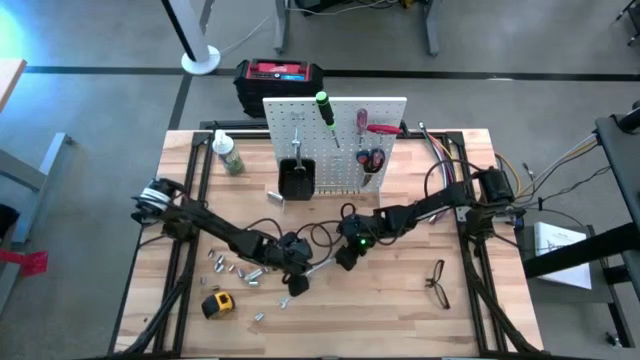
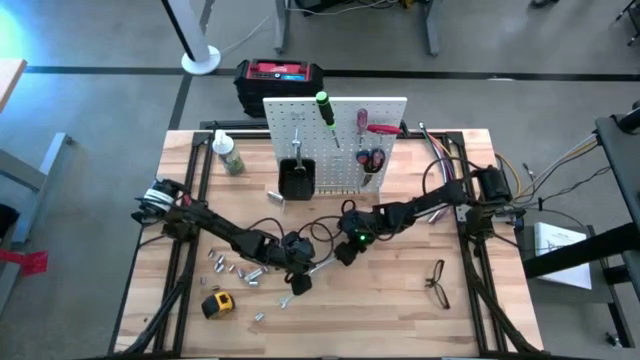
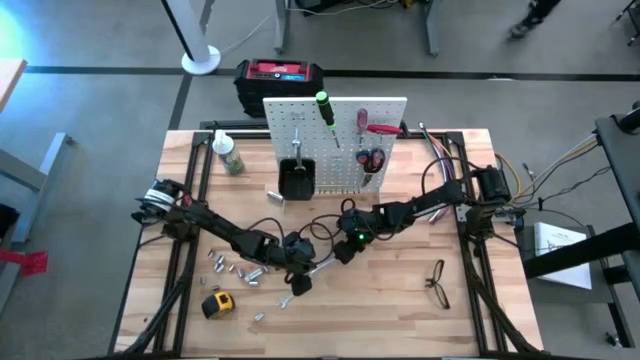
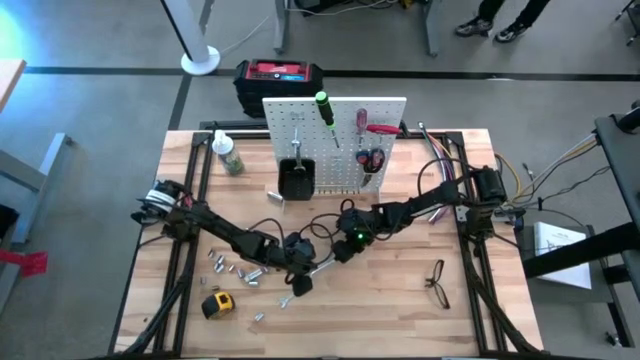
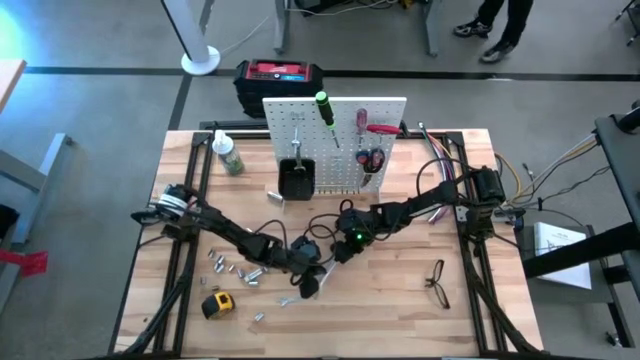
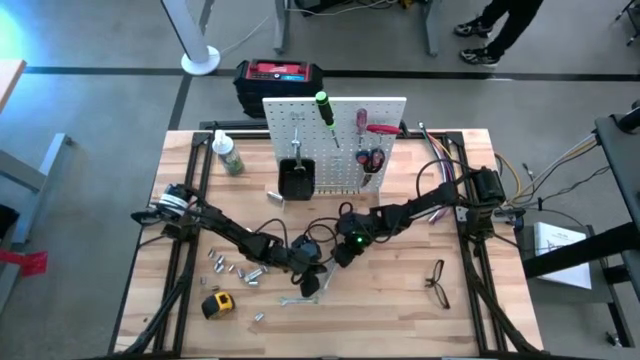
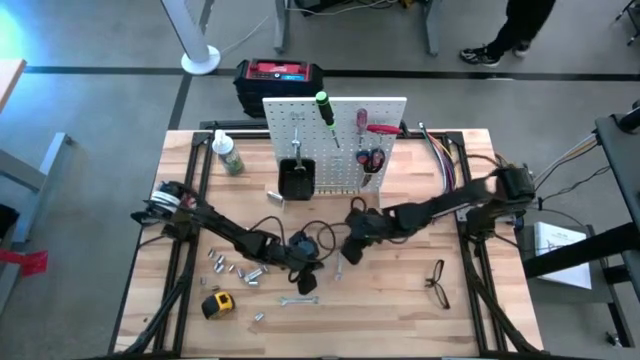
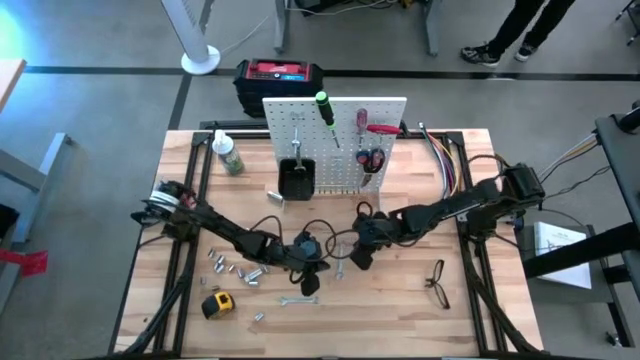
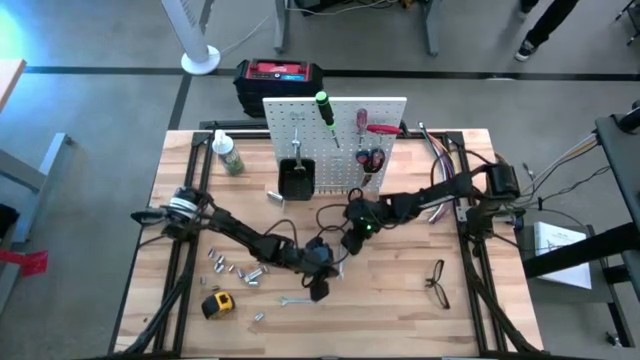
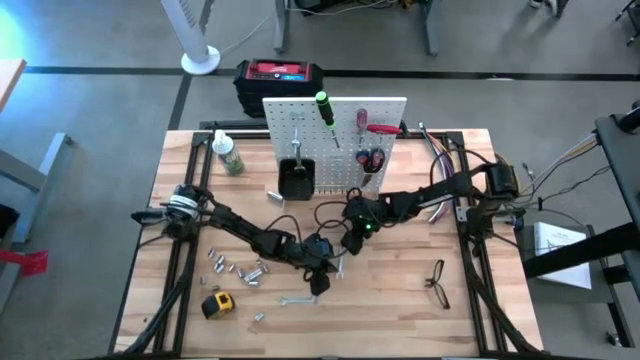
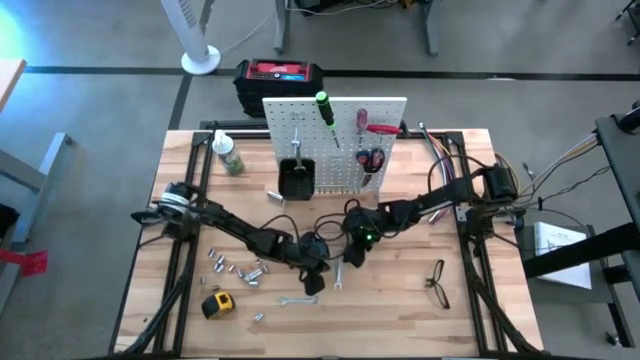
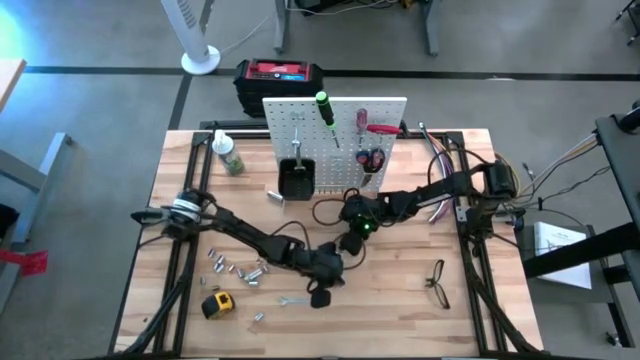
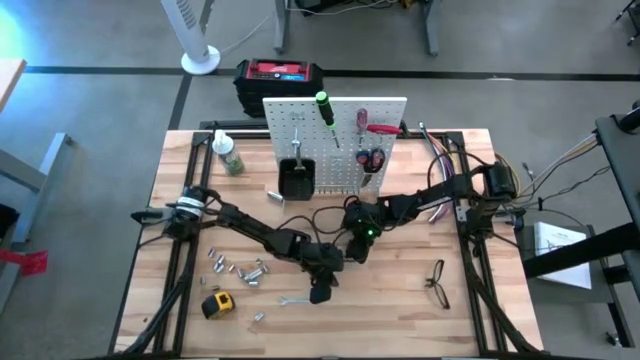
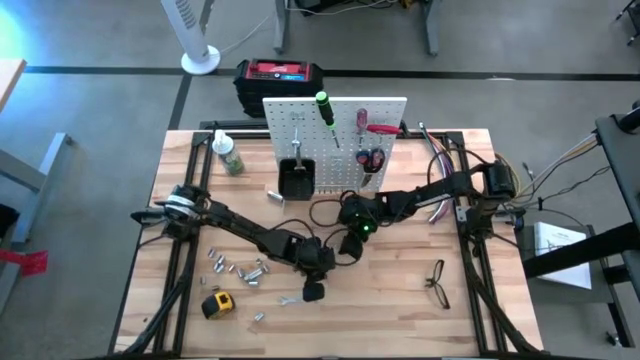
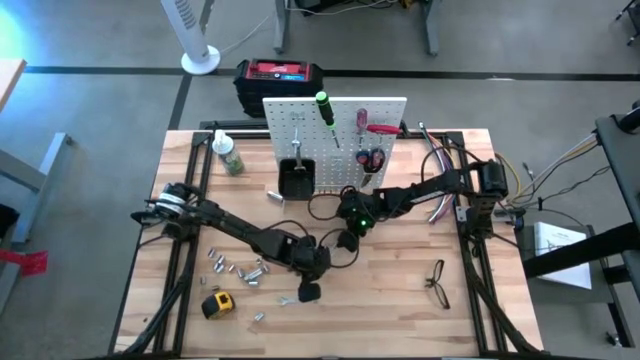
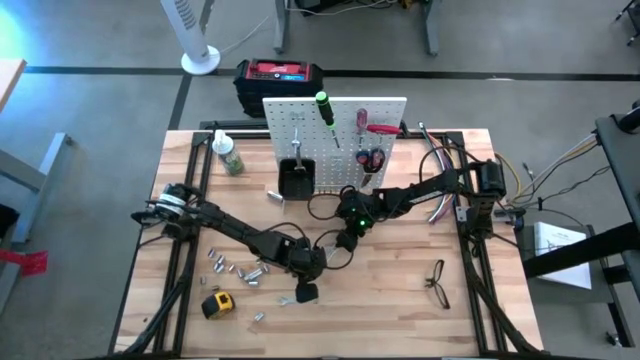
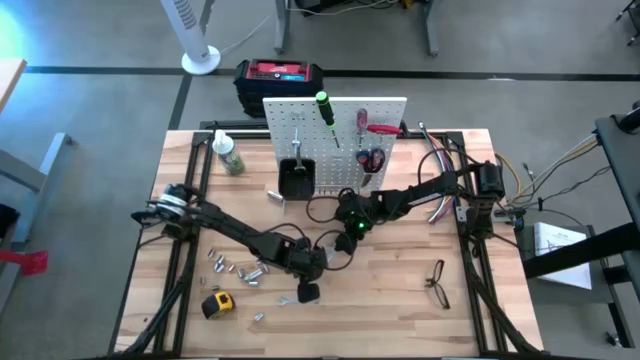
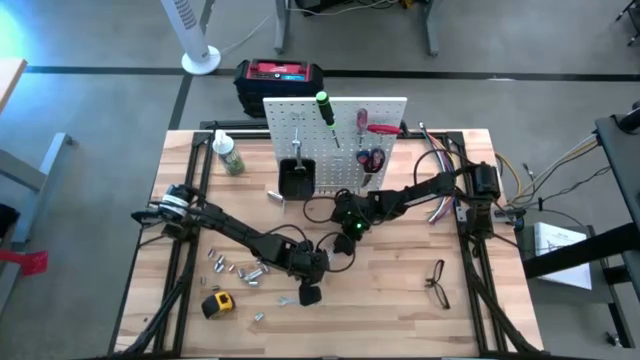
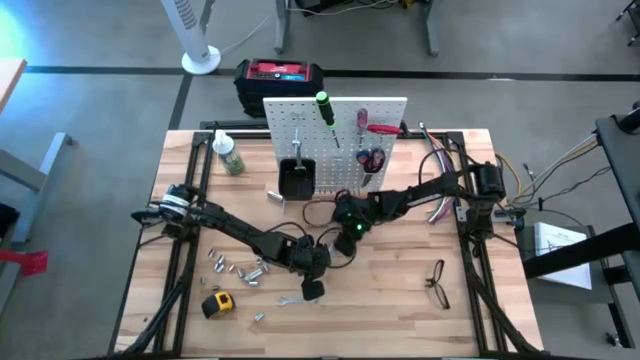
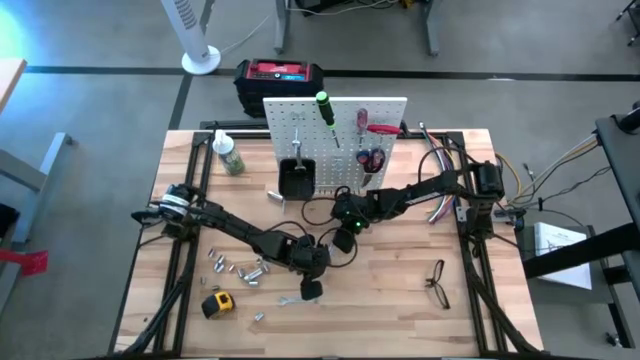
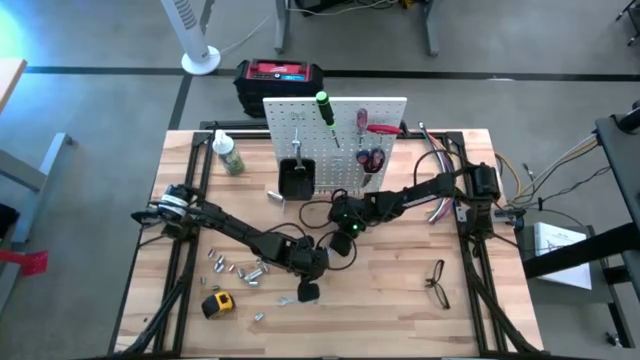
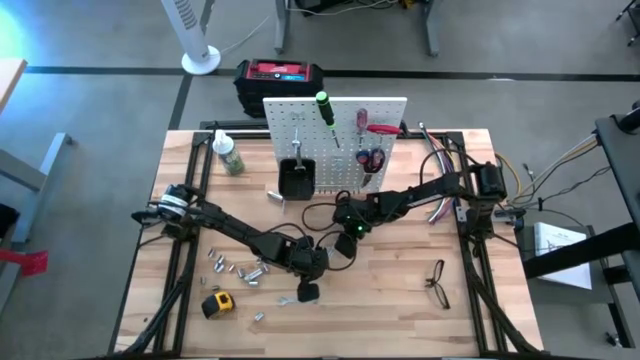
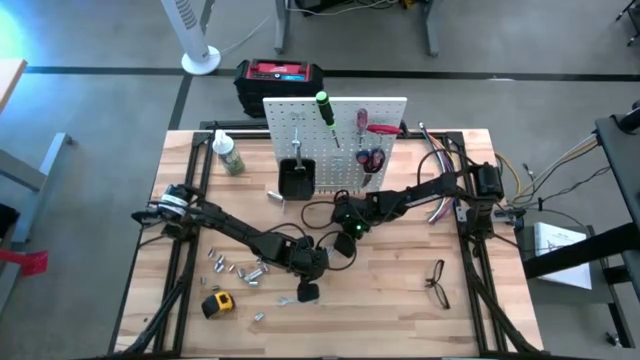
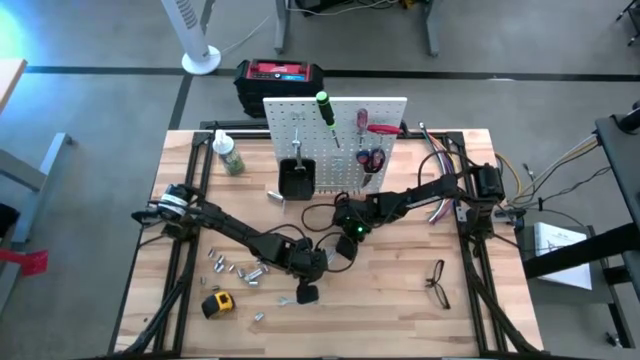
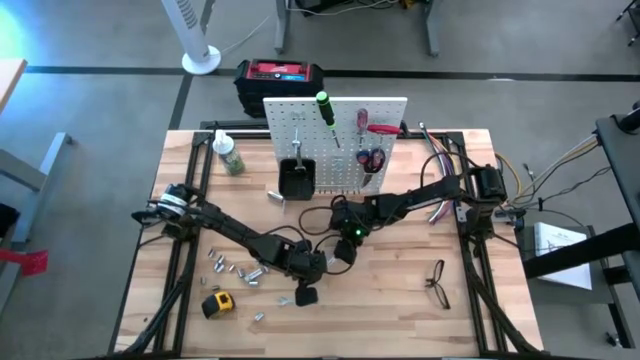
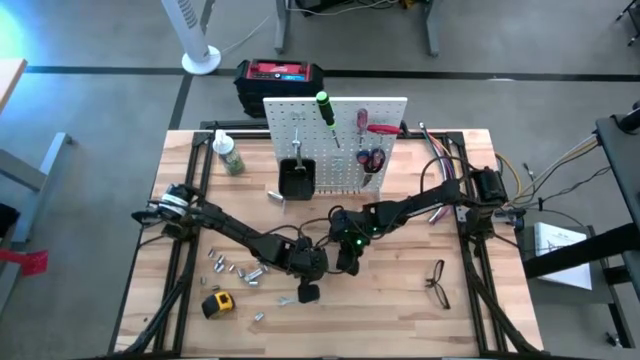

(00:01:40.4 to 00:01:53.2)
Task: Hang tools onto peg board
Hang the left silver wrench on the pegboard

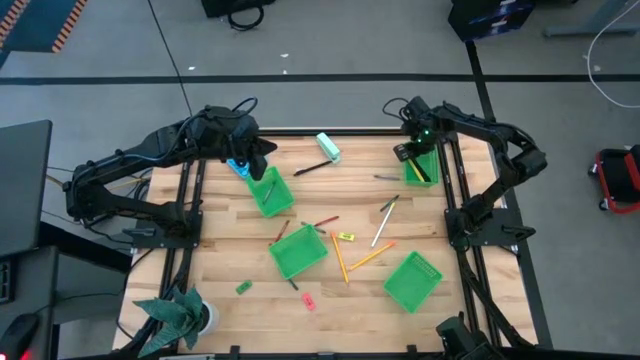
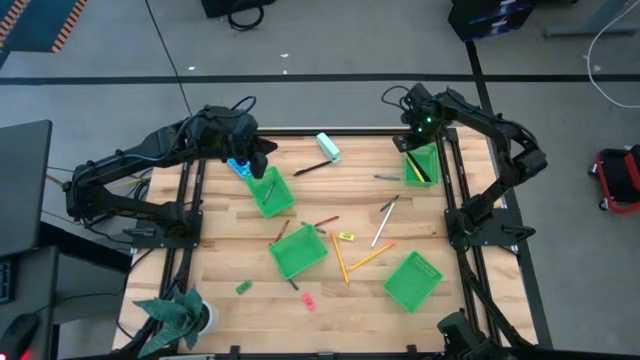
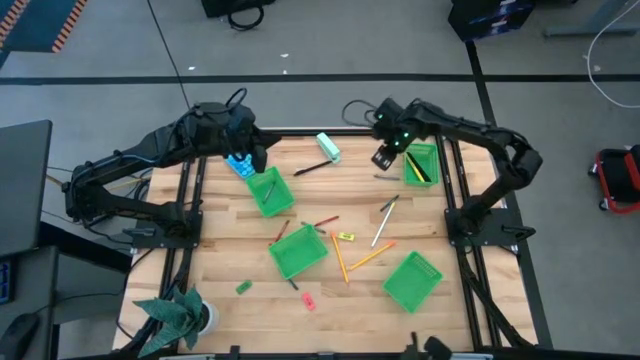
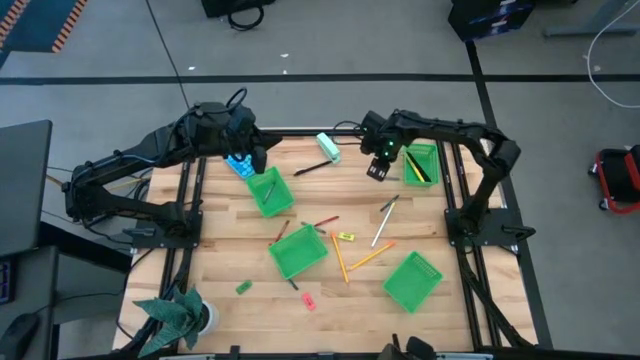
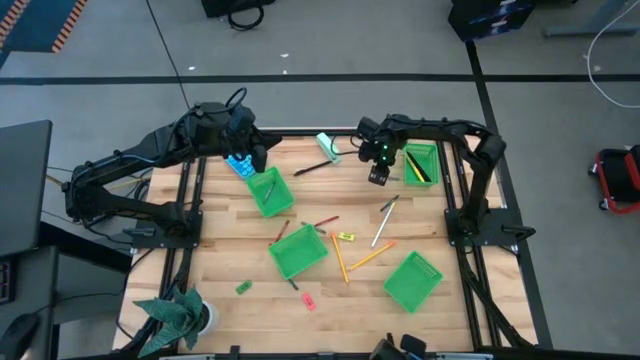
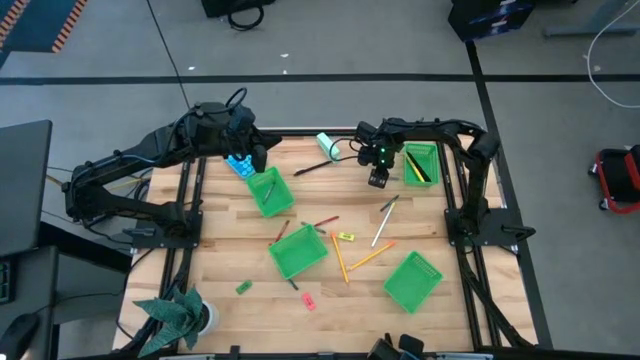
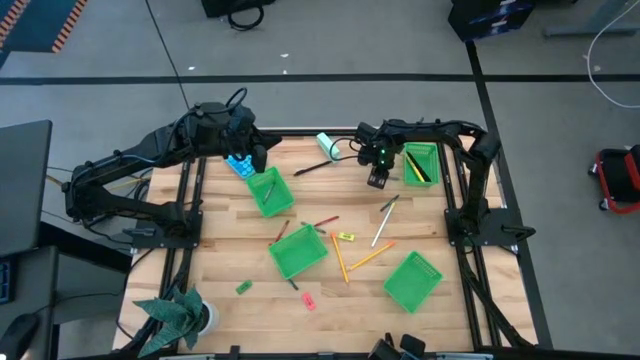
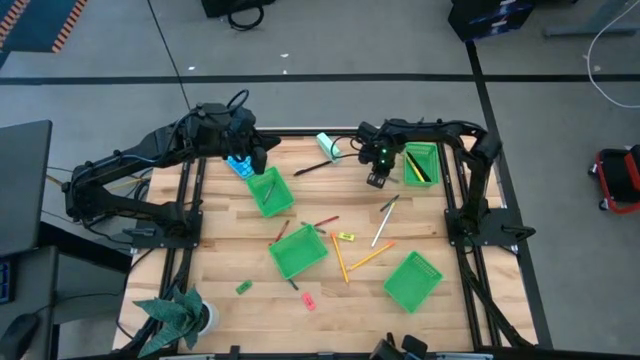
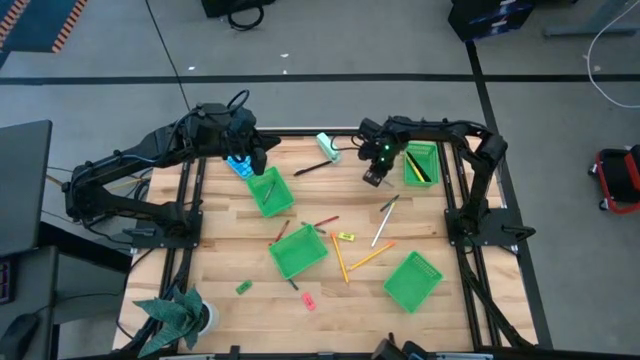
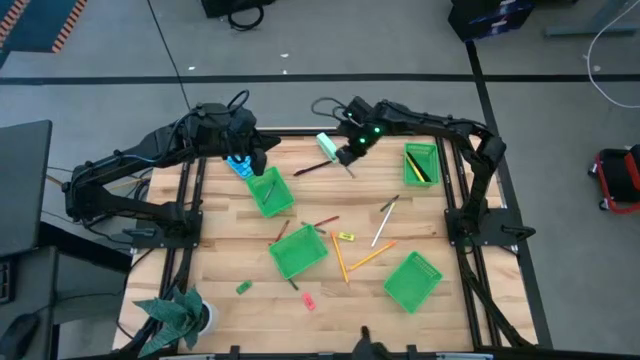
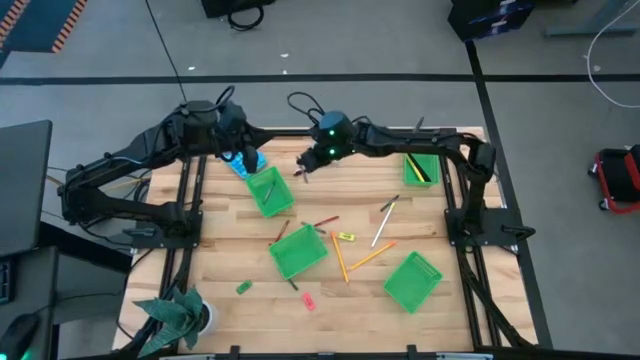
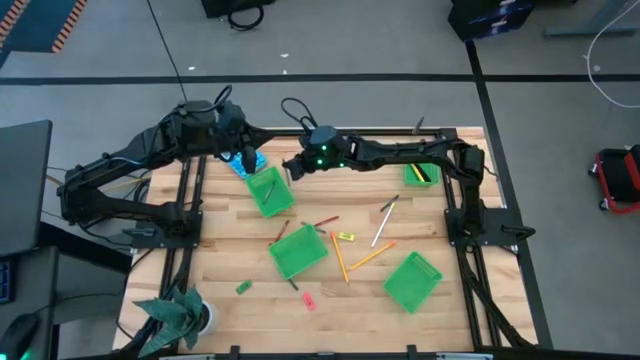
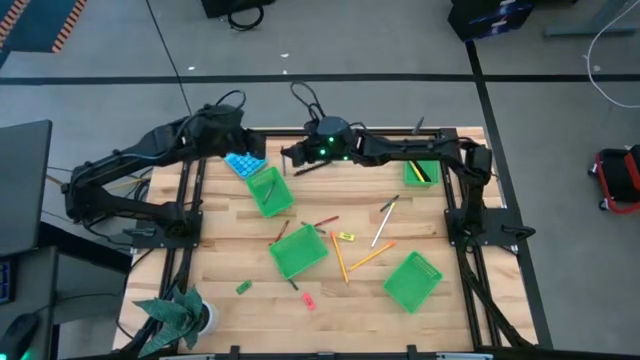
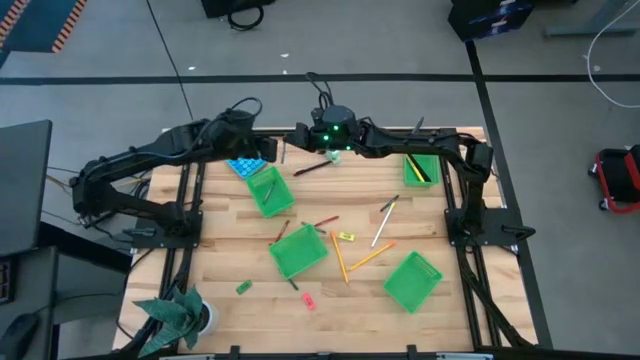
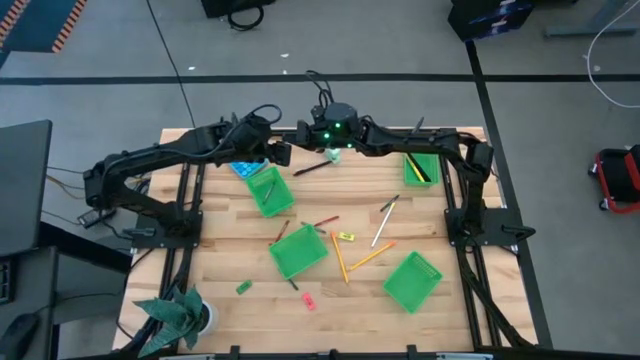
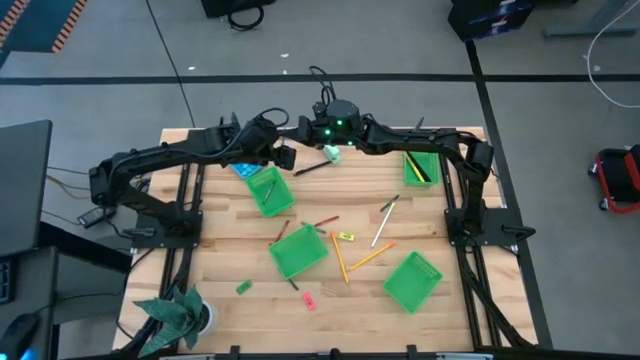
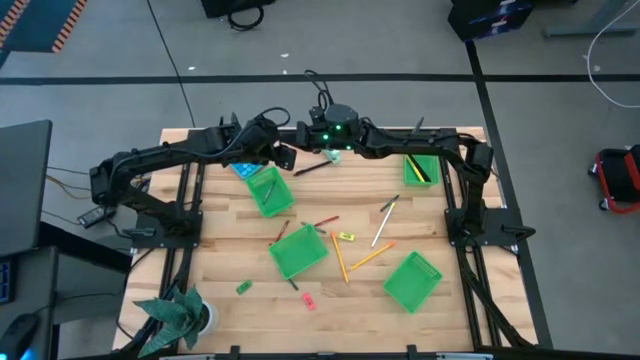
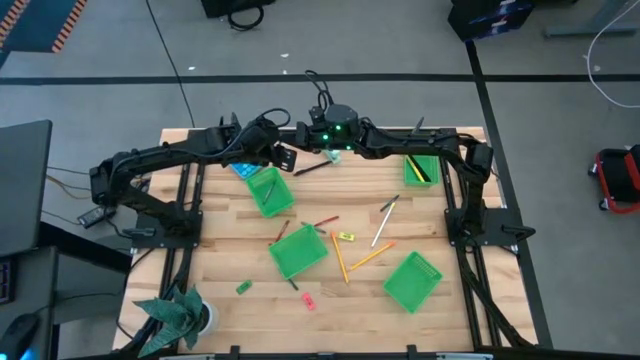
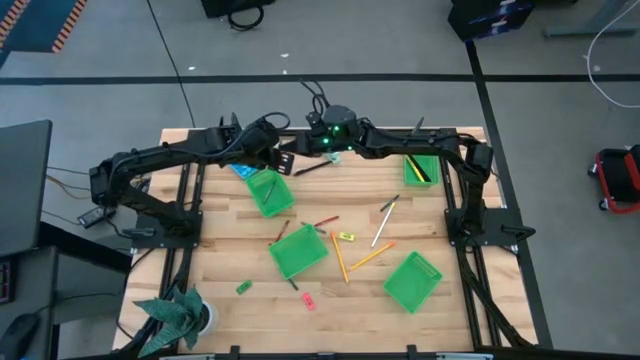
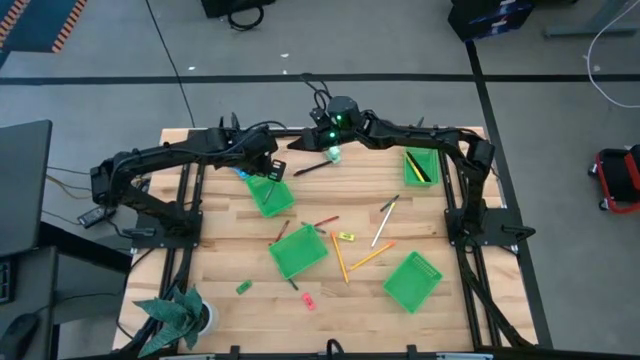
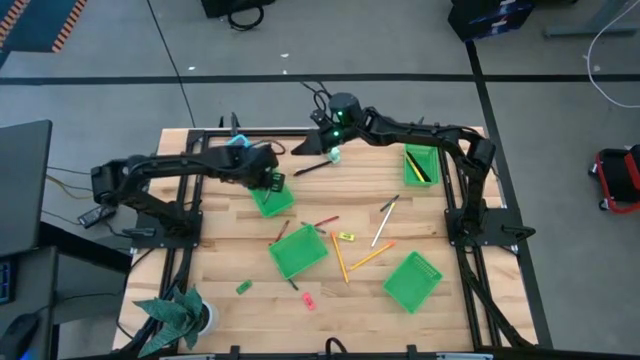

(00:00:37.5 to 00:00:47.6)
Task: Sort crayons/erasers/pens/pencils in bins
Put the top gray crayon into the top left green bin
